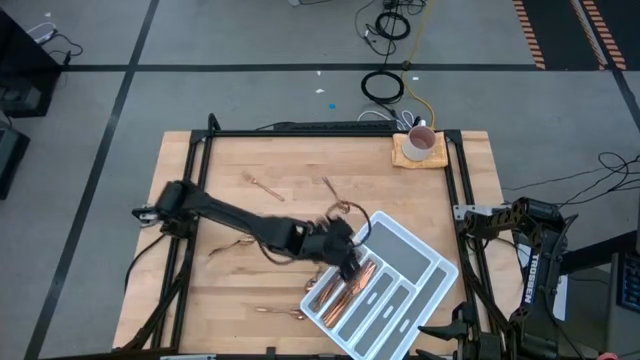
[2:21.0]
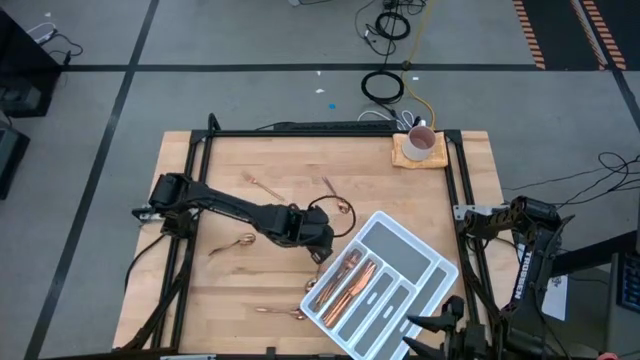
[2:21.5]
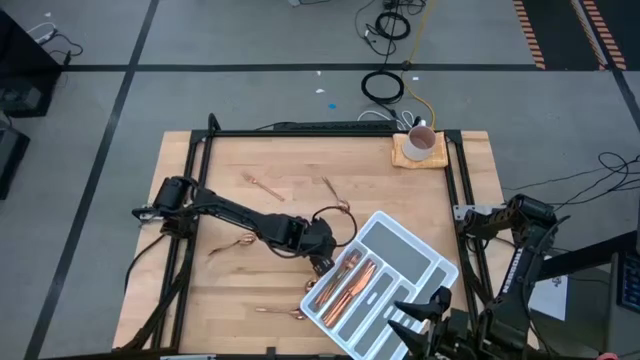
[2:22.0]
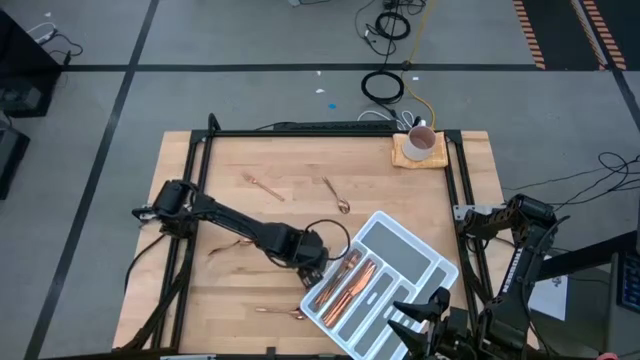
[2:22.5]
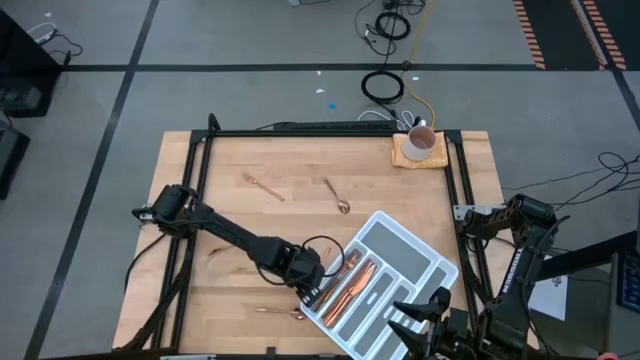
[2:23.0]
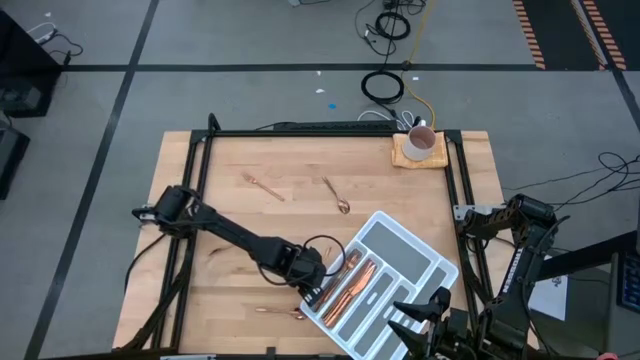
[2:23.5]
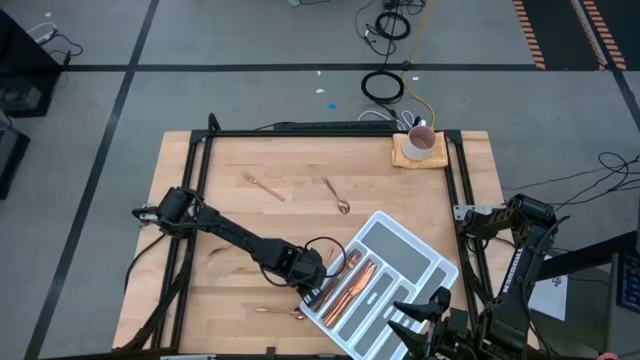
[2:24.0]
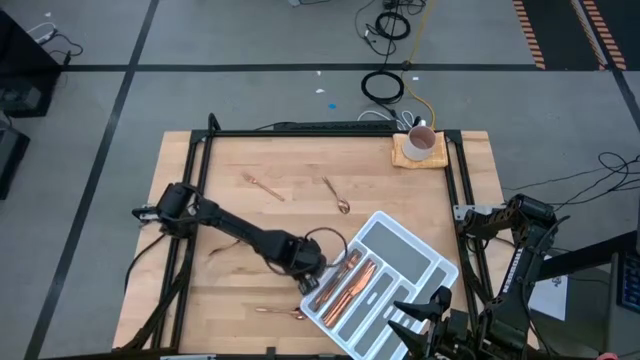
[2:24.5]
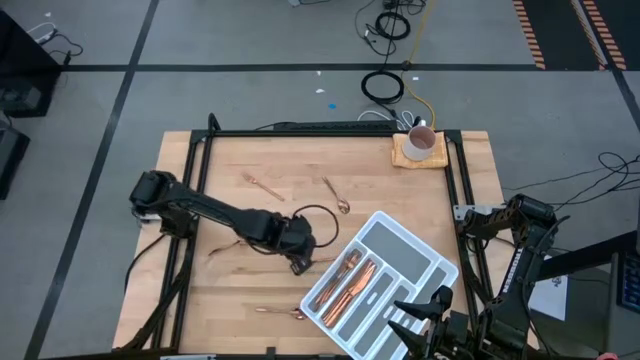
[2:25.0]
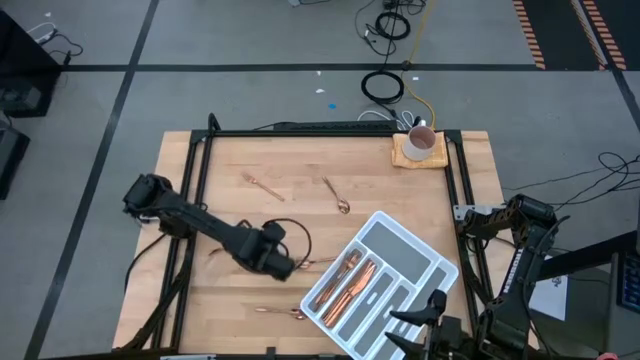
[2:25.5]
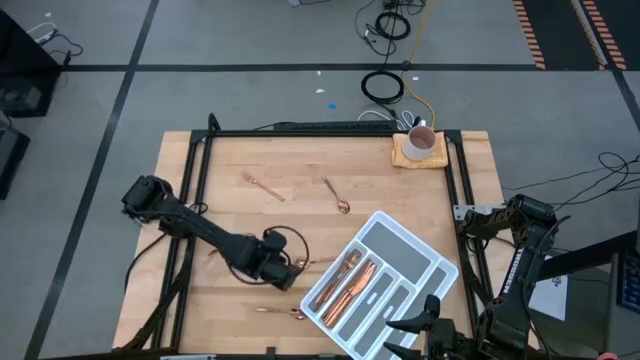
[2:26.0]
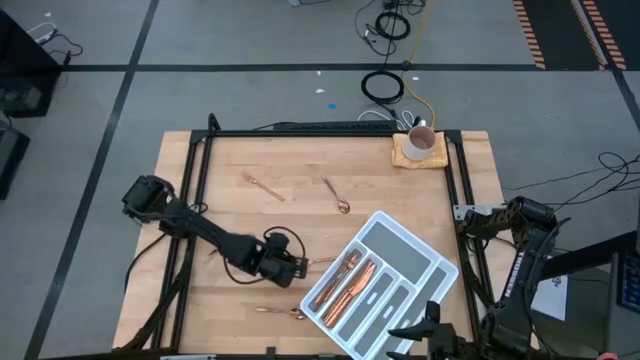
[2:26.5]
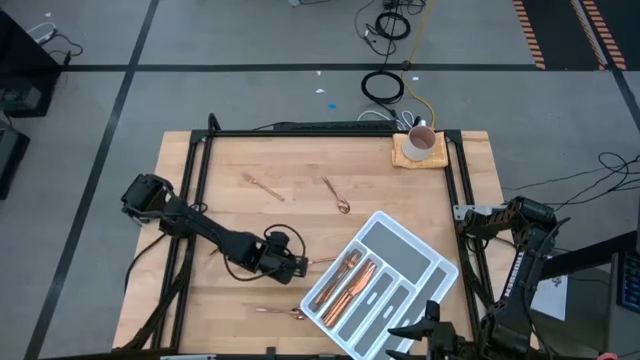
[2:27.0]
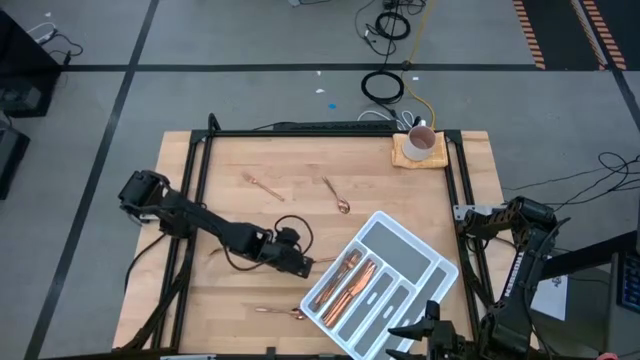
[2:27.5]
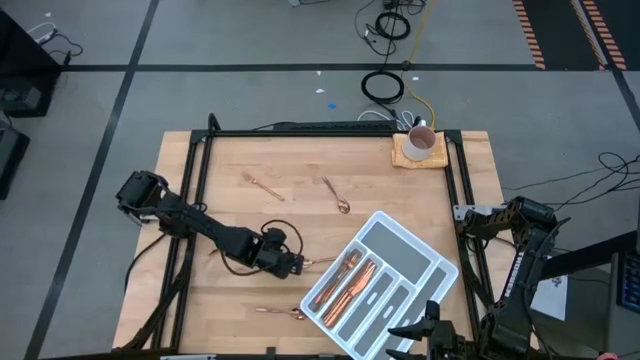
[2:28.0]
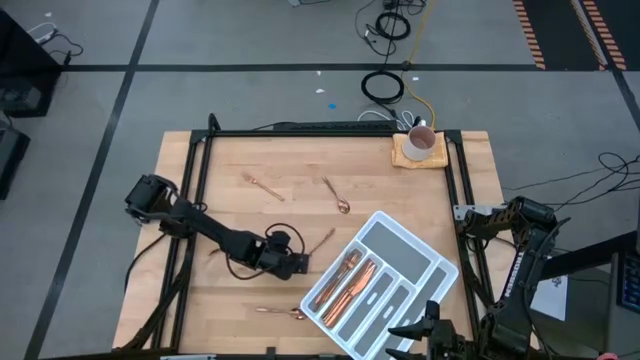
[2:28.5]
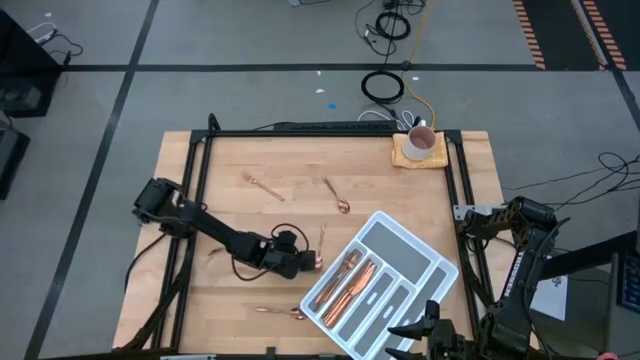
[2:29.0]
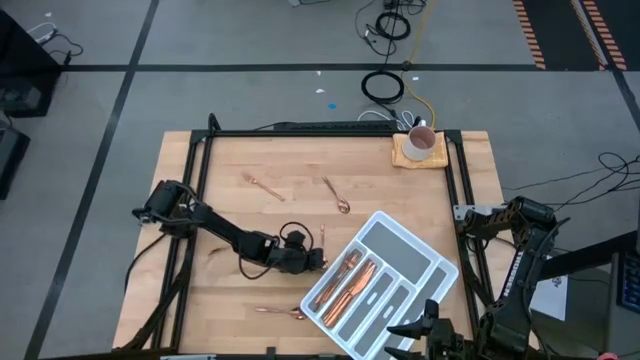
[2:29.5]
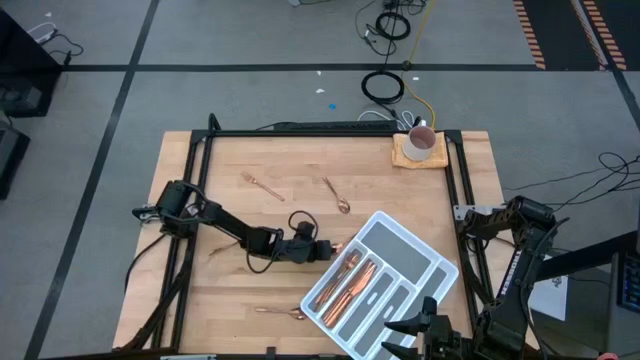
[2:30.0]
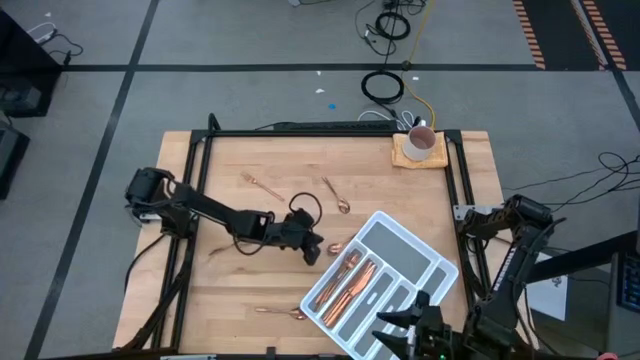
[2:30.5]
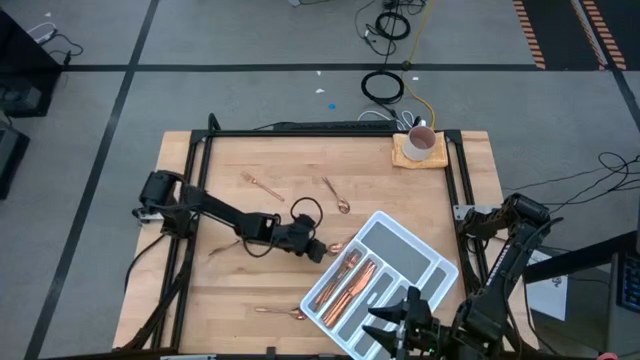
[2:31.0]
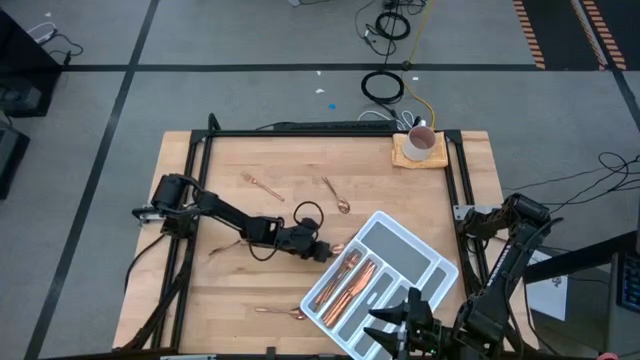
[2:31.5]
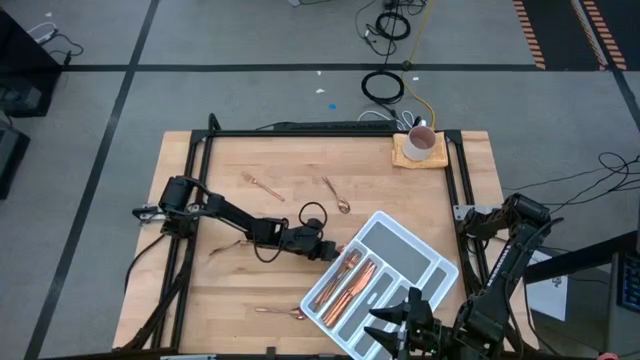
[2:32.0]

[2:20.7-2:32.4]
Task: Sort silverware
Put the gold spoon into the silverware tray

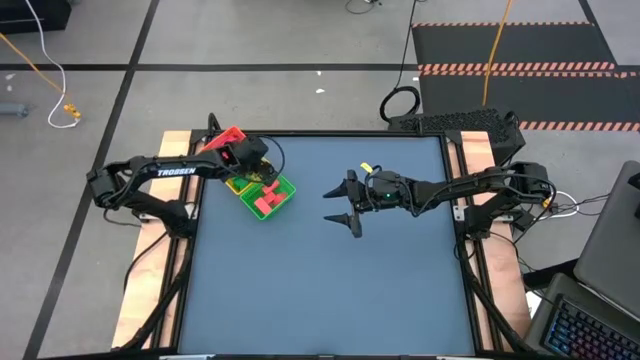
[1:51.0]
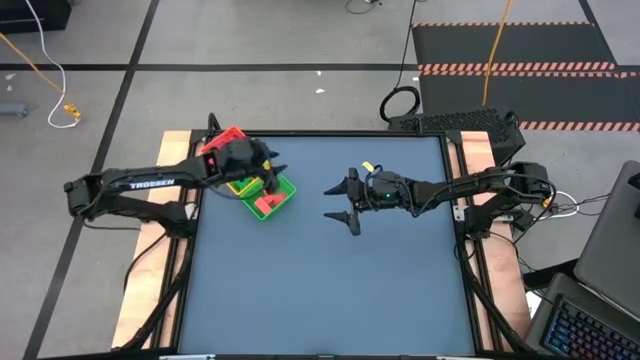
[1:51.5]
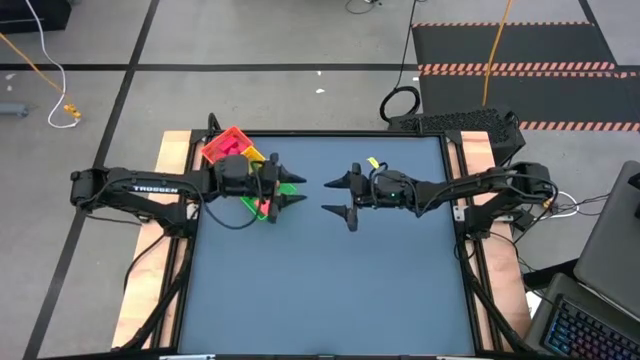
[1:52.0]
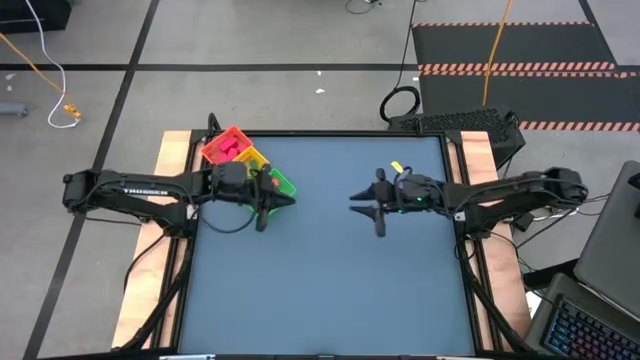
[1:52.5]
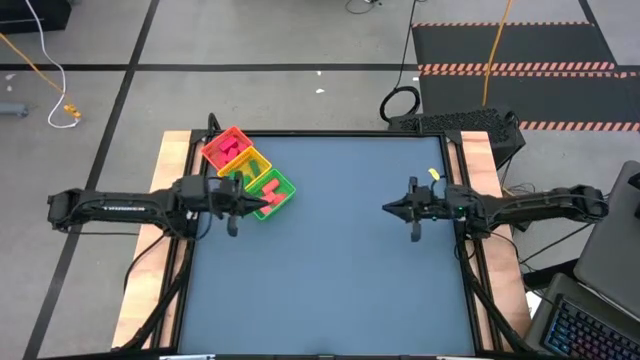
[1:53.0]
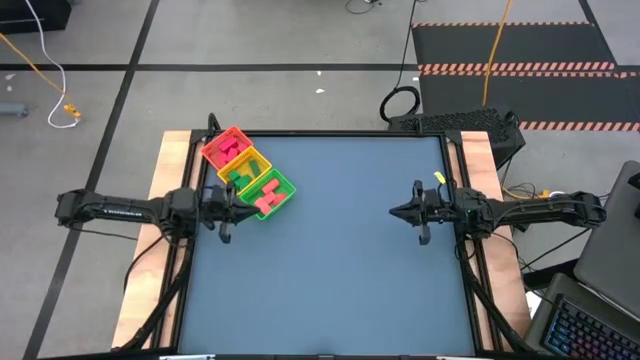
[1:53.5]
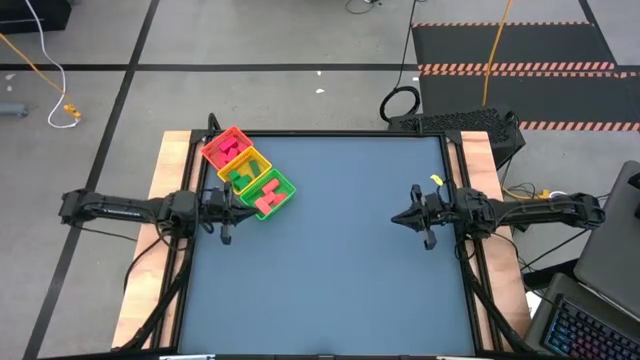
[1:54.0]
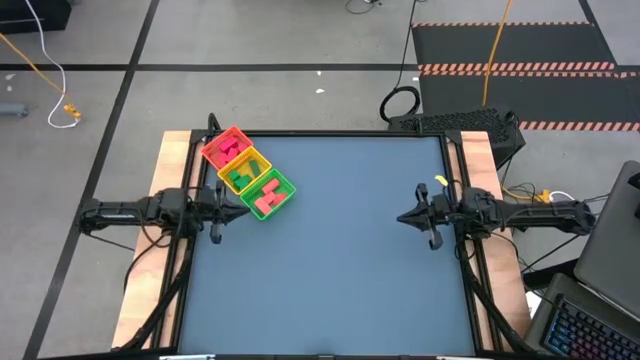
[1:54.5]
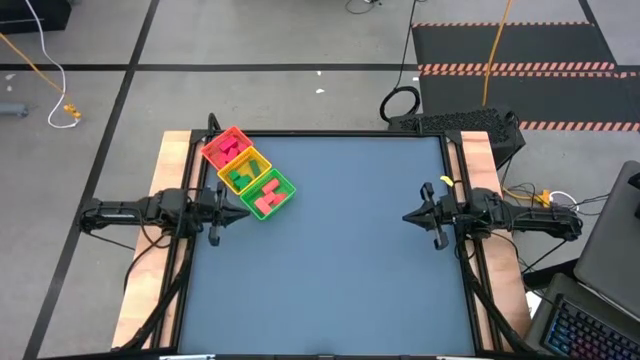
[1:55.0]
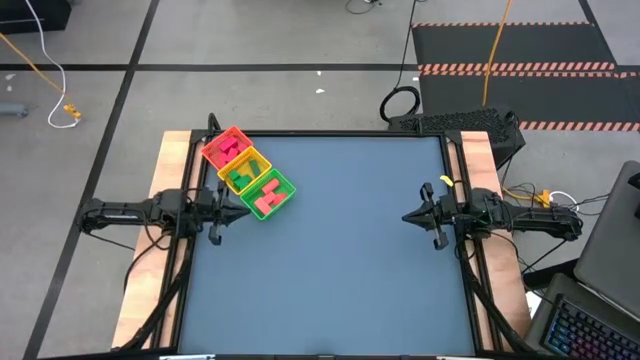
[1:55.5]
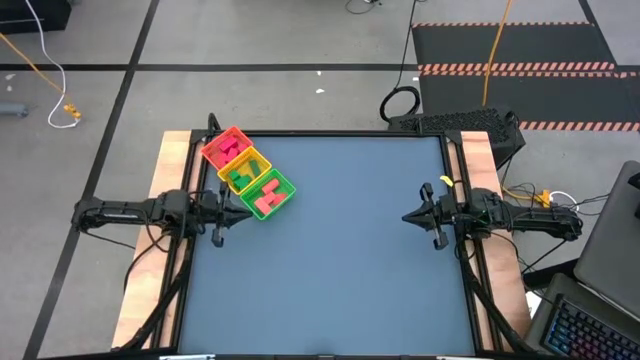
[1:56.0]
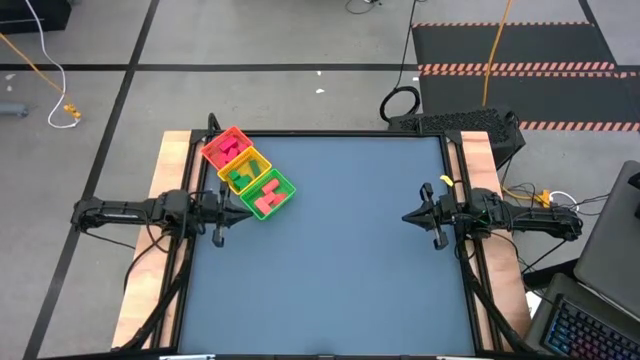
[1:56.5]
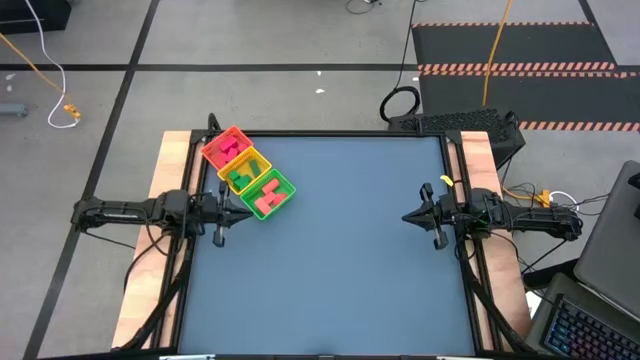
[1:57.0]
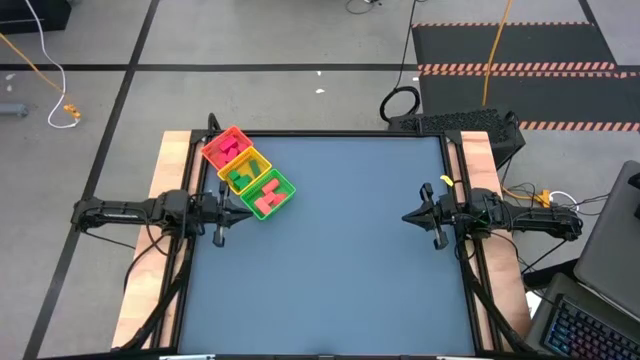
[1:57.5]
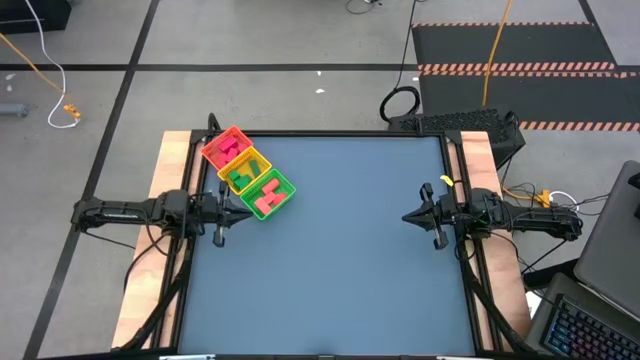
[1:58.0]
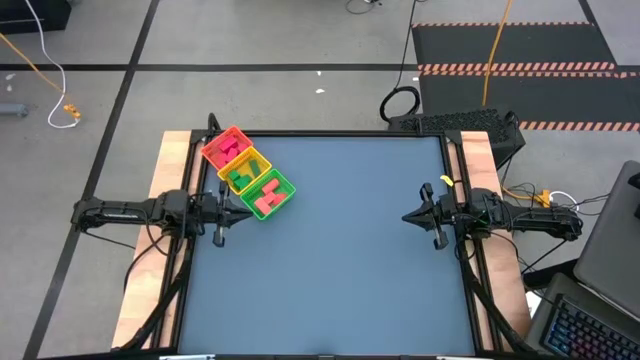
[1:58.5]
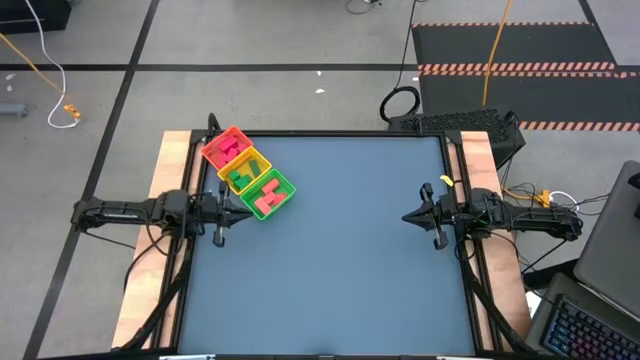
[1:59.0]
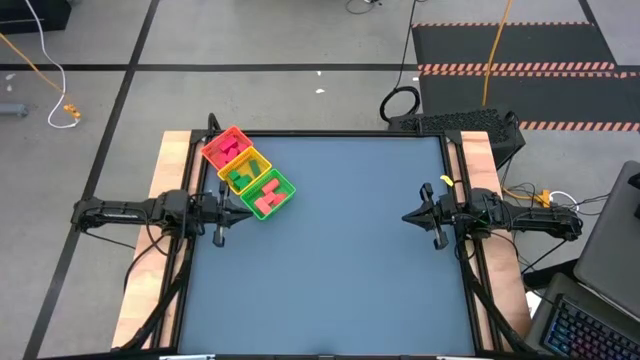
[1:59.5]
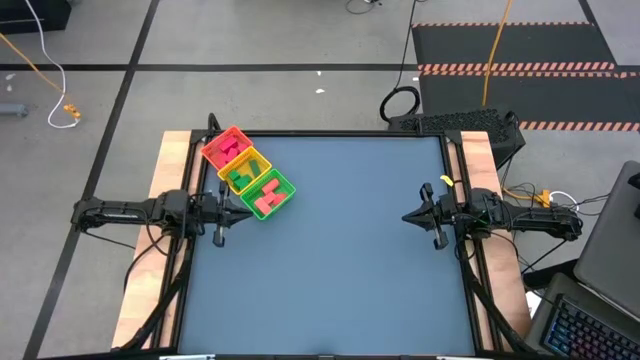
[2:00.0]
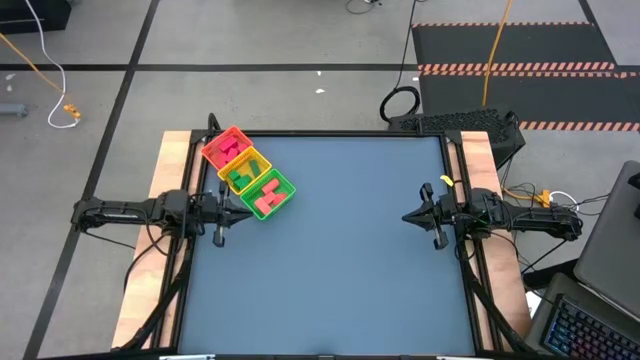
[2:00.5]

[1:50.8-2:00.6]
Task: Sort & place blocks by color
Return to Home Position
